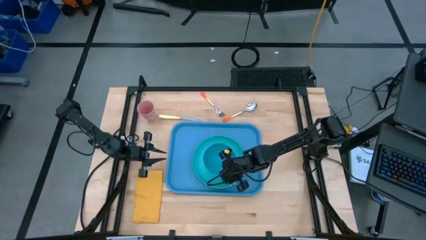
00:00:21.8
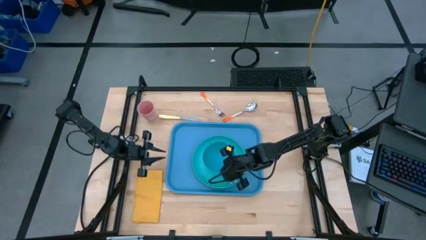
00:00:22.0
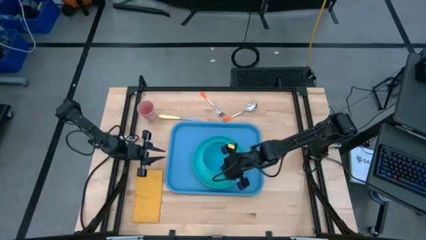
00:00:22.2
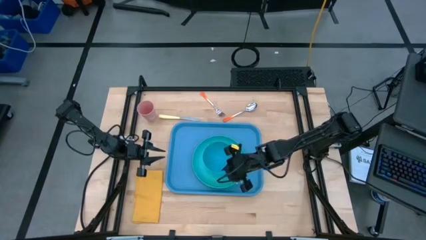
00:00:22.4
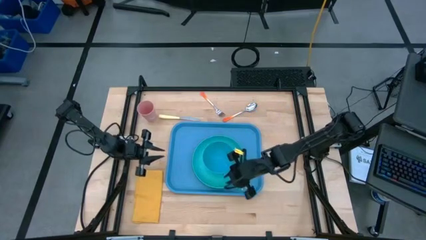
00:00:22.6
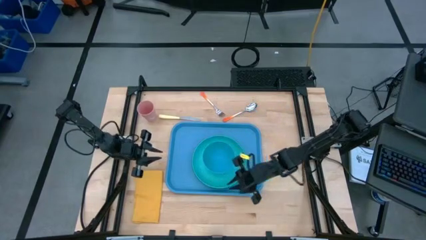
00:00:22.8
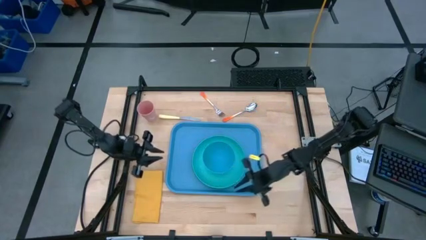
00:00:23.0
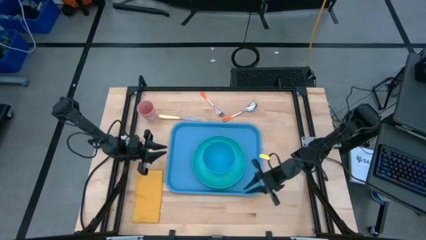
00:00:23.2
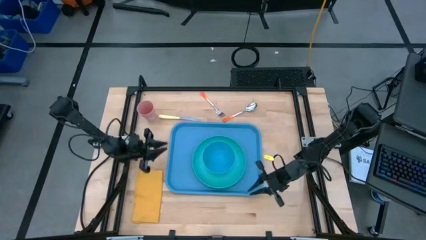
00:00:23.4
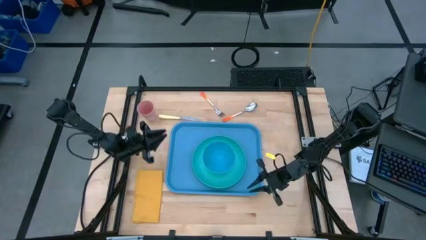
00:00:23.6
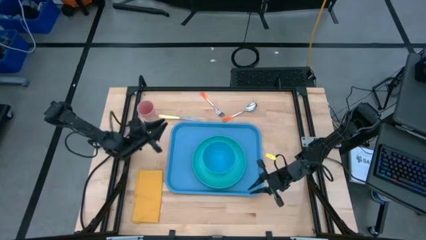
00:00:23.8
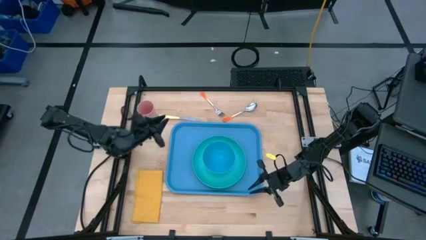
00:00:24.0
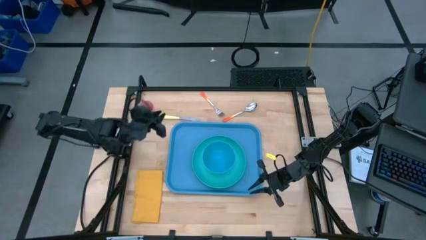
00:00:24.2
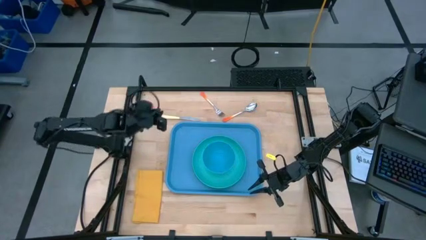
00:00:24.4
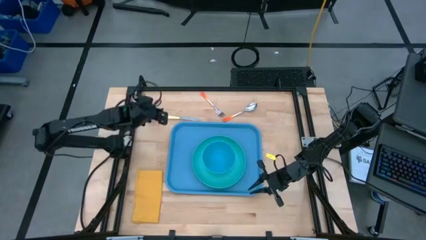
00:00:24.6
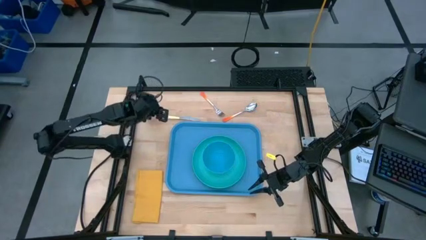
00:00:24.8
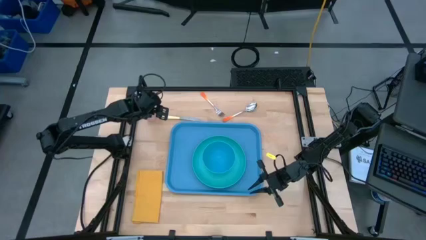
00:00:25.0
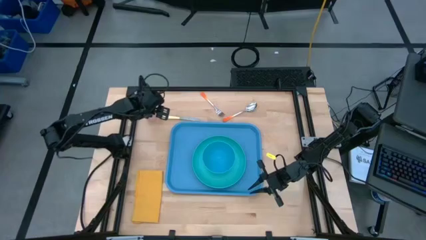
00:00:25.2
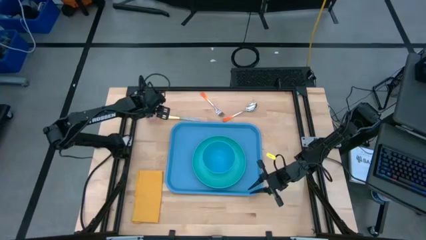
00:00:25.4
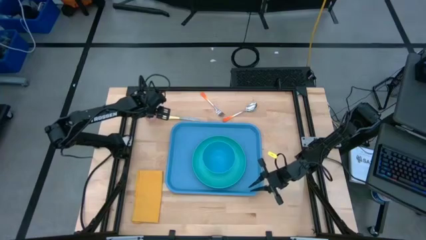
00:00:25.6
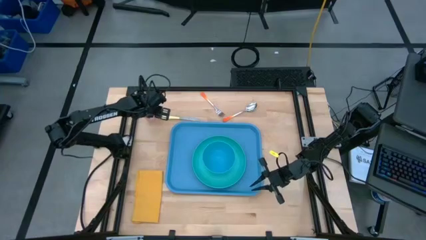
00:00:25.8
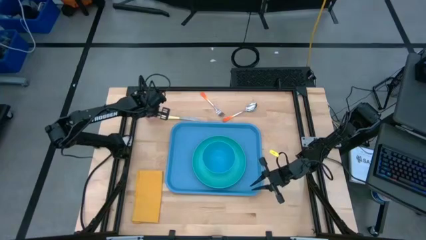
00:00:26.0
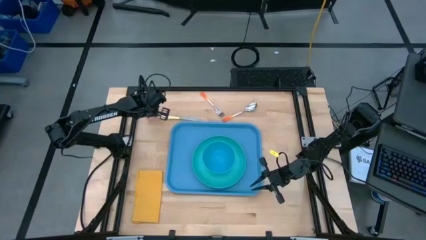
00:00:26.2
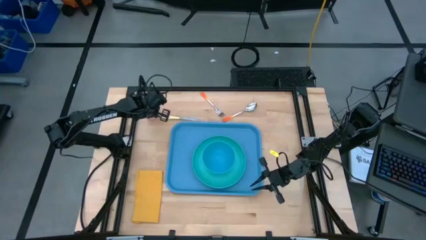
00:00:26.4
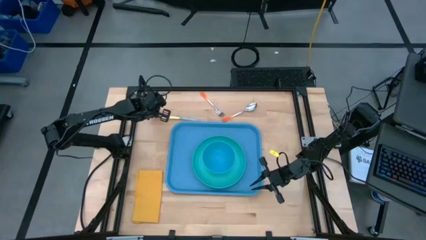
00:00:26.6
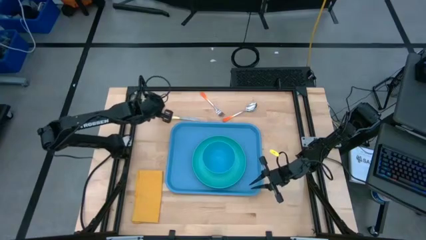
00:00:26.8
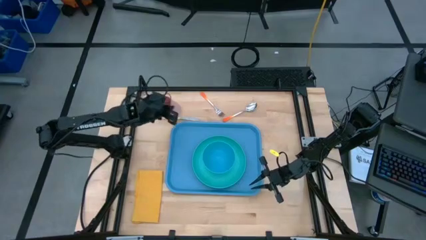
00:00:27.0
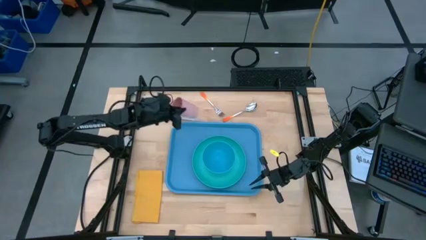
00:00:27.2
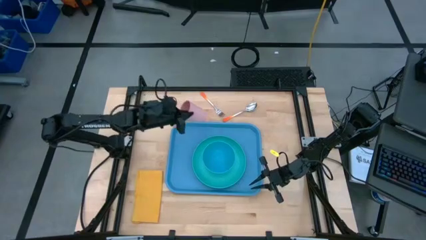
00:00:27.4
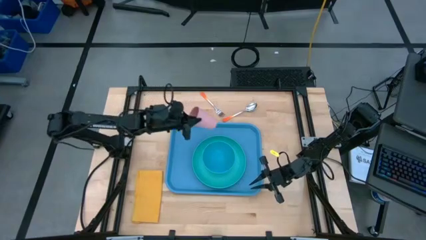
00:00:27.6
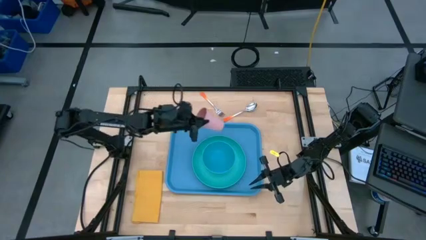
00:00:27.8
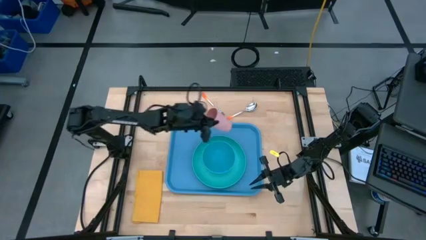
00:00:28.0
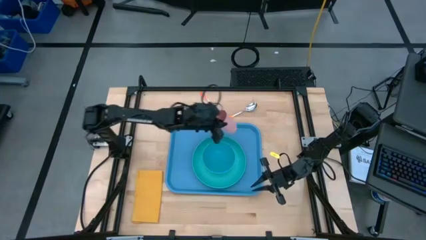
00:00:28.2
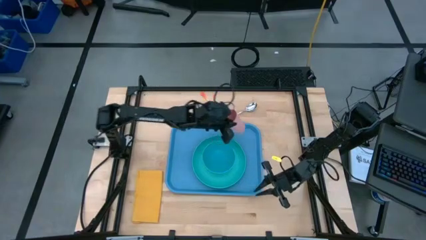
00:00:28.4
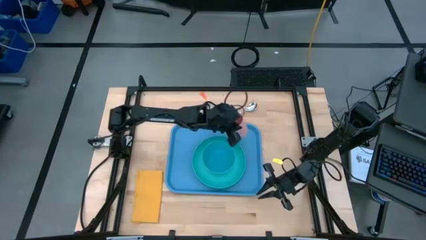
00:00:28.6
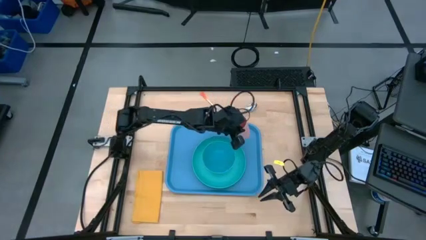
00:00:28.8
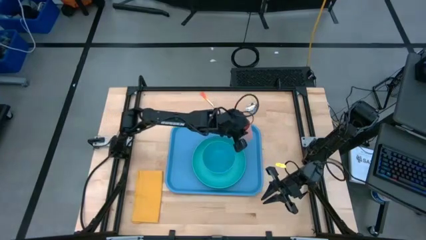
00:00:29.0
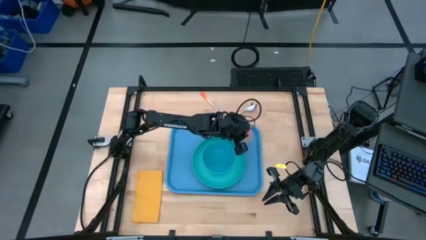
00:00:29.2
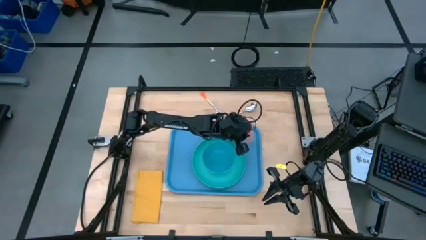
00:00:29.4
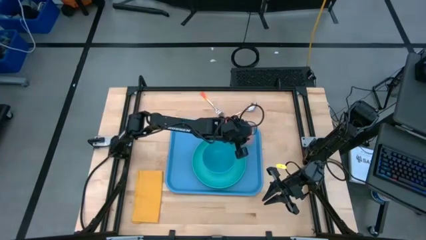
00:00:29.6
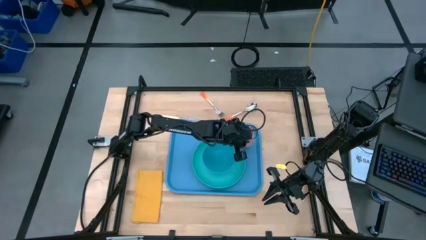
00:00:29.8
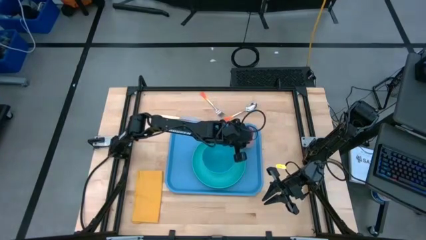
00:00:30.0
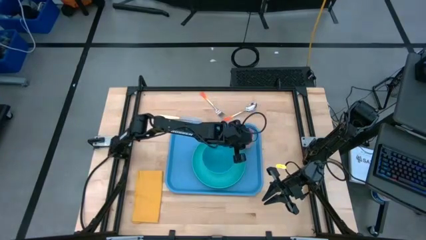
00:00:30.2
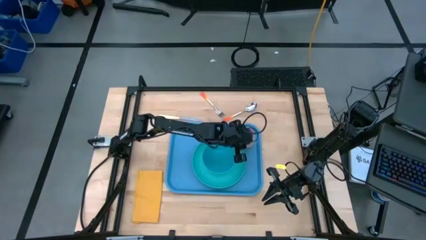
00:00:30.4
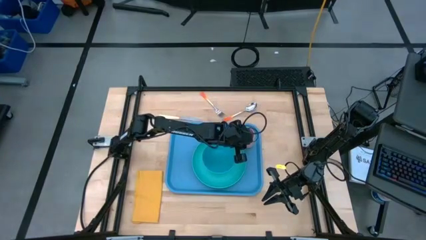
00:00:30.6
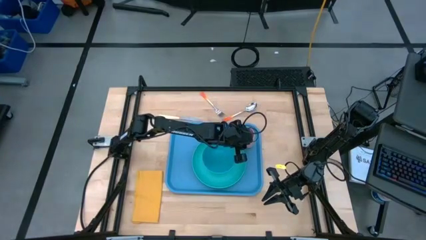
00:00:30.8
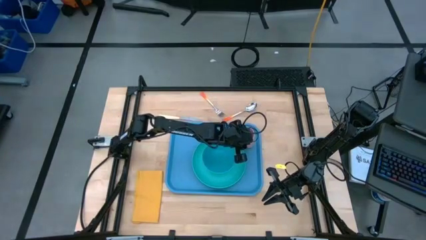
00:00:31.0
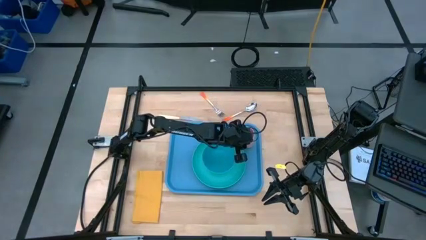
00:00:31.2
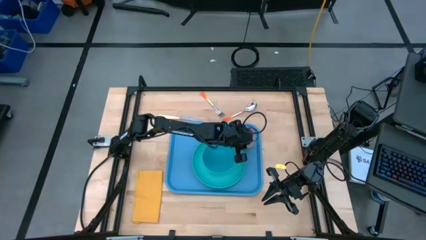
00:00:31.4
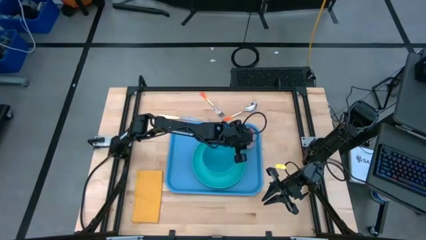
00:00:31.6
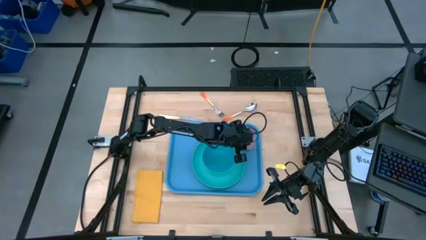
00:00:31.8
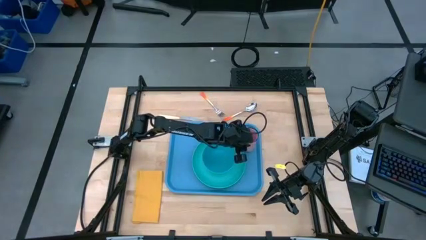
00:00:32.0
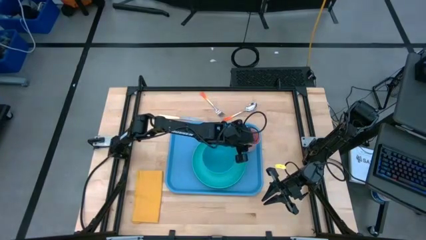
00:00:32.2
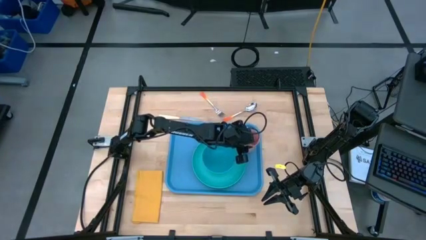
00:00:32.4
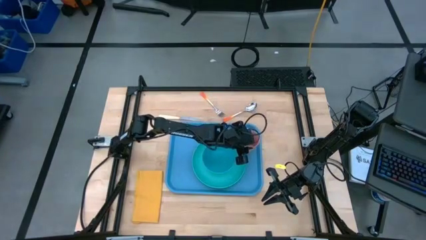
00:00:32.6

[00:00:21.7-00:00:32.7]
Task: Set up tray
Put the pink cup on the blue tray

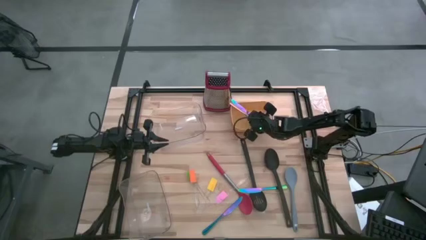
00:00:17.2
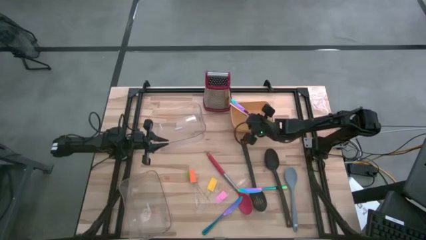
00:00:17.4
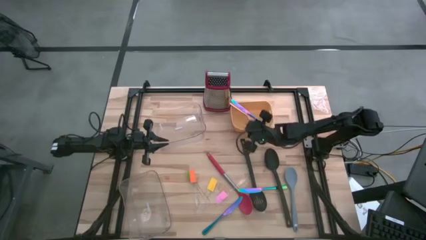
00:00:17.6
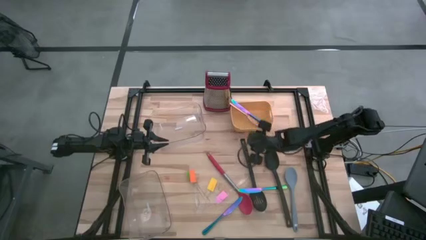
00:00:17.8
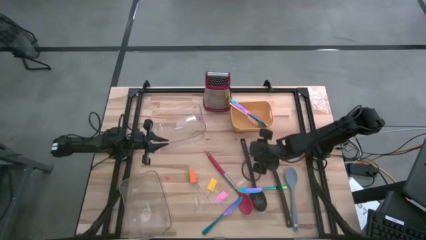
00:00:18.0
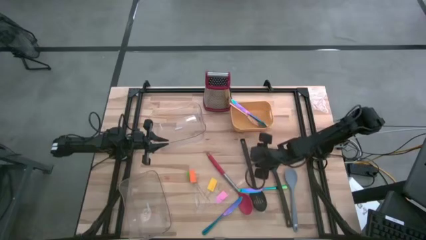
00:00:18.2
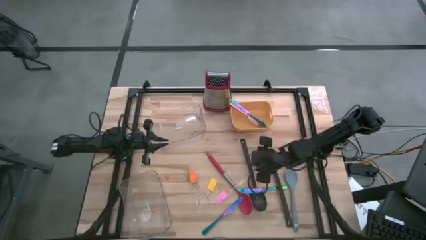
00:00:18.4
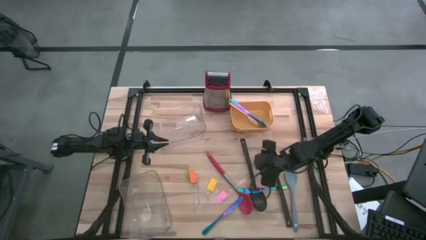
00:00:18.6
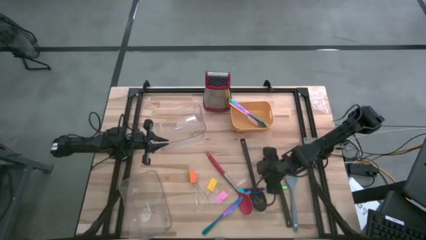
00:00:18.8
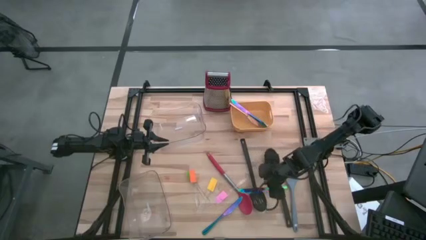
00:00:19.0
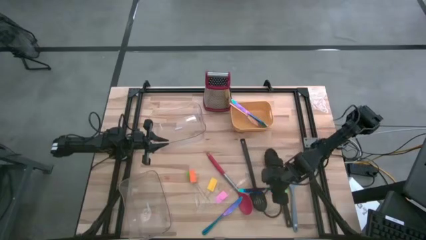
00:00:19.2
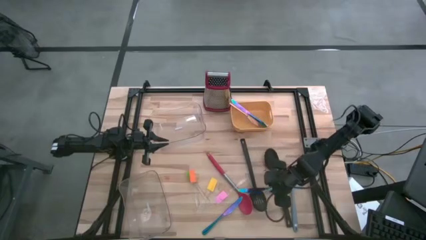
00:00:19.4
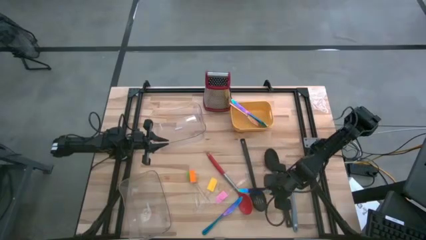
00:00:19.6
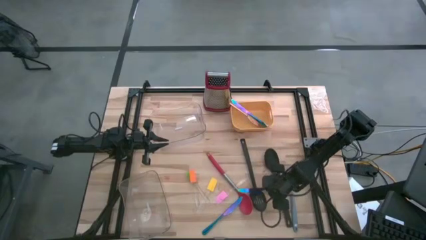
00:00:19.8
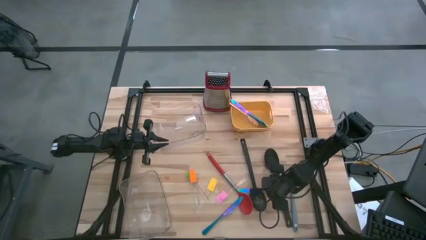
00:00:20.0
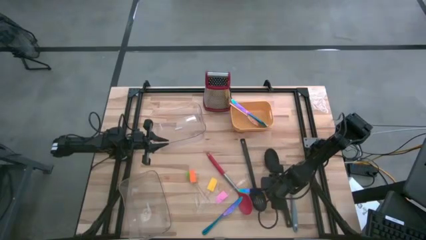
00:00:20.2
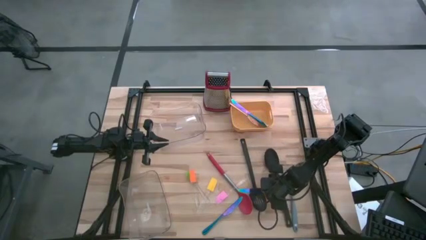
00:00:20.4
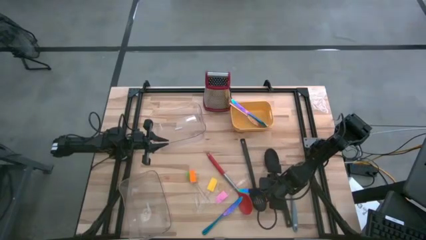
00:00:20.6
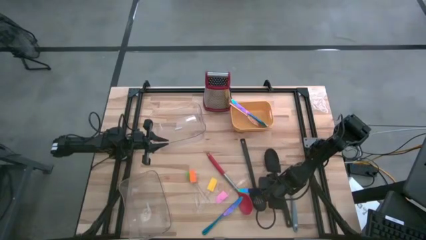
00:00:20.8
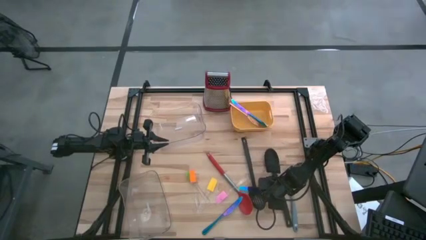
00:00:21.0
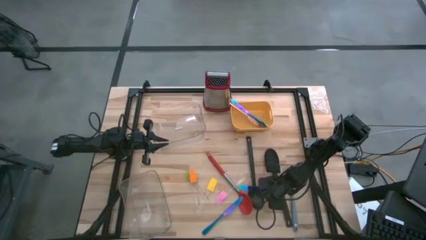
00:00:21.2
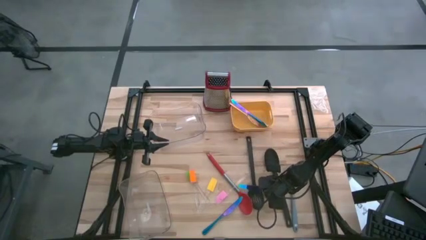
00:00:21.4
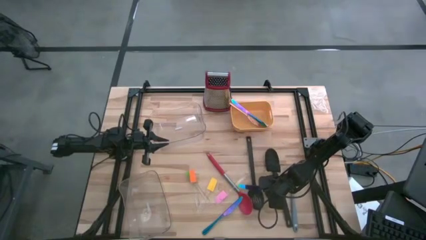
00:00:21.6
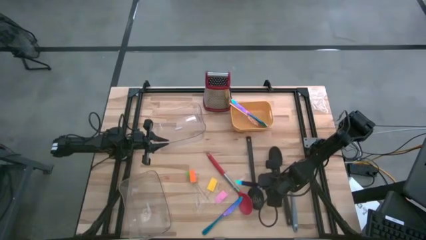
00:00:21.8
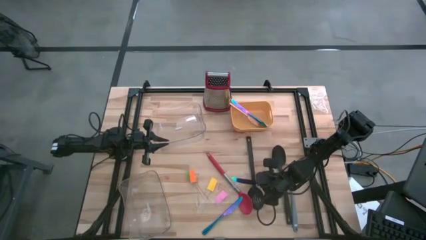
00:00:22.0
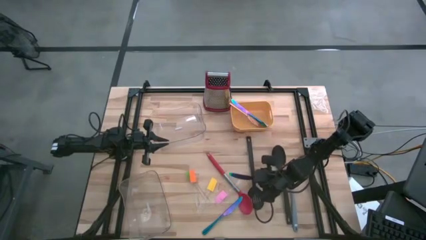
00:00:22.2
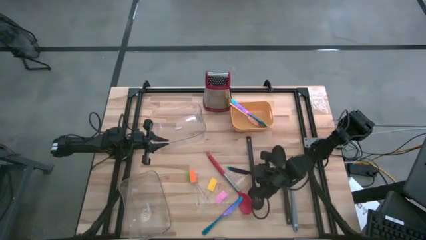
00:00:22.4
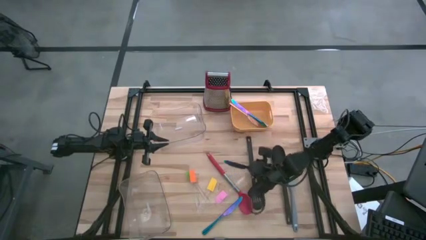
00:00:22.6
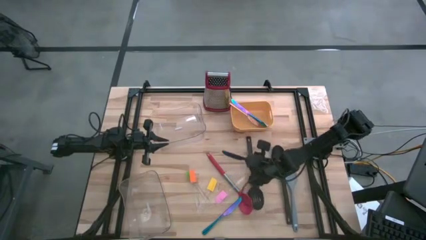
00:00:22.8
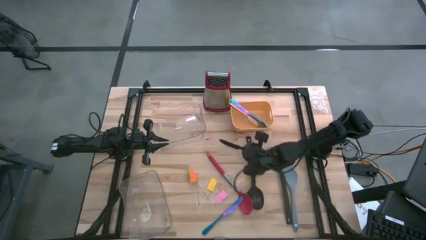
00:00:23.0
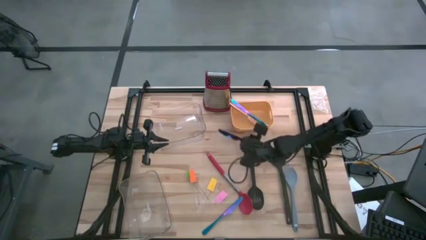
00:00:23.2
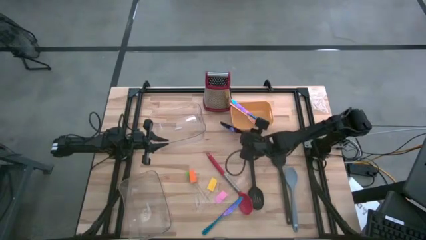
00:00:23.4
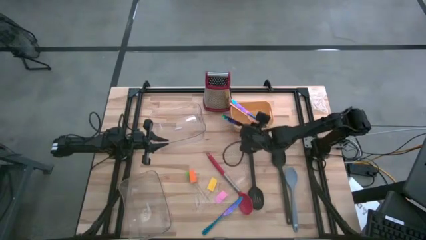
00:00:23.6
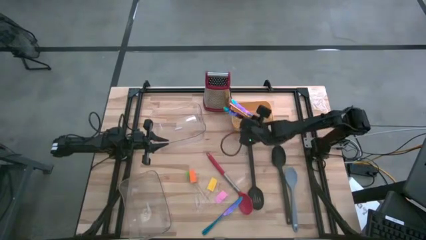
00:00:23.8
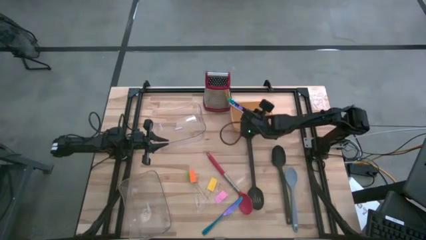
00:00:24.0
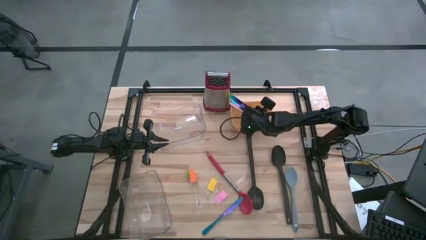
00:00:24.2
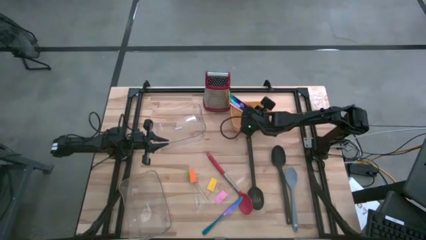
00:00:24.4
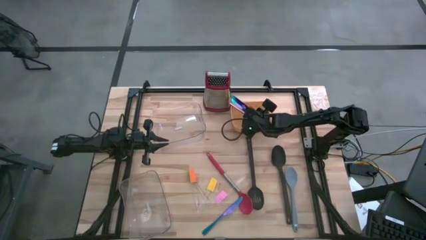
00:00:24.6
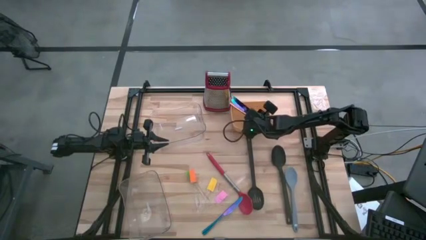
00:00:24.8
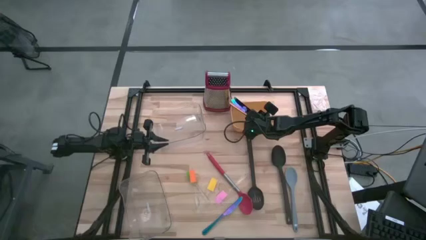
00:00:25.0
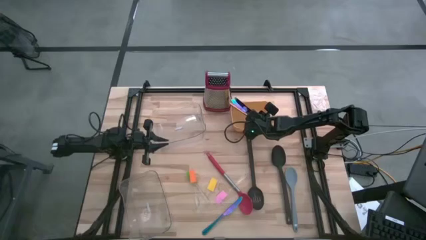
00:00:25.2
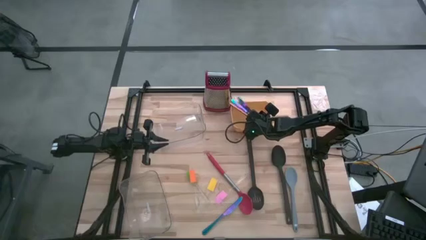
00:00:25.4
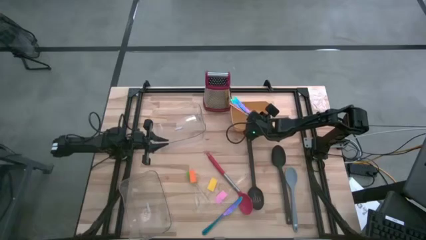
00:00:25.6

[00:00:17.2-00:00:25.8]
Task: Pick & Place Kitchen Items
Put the blue knife into the yellow bin
